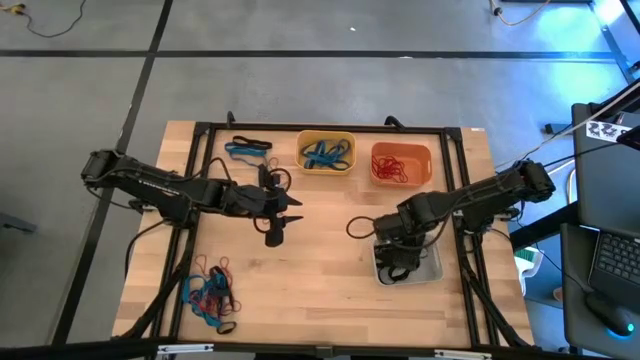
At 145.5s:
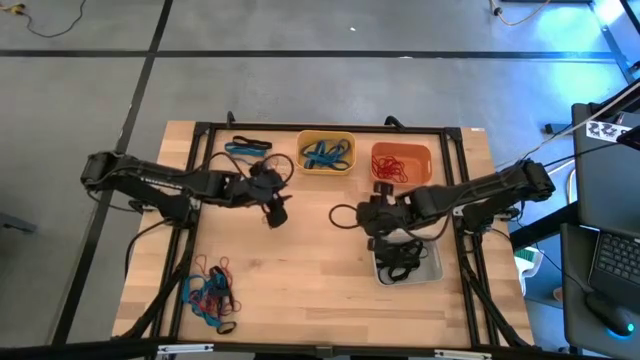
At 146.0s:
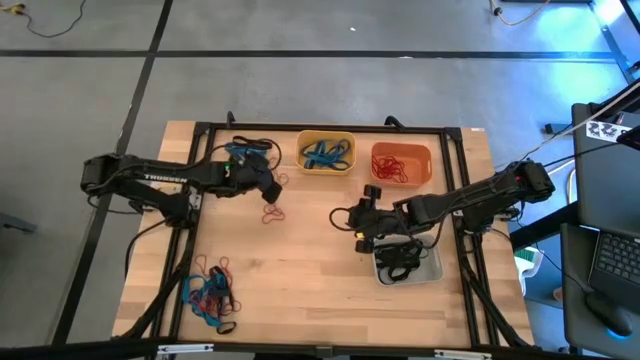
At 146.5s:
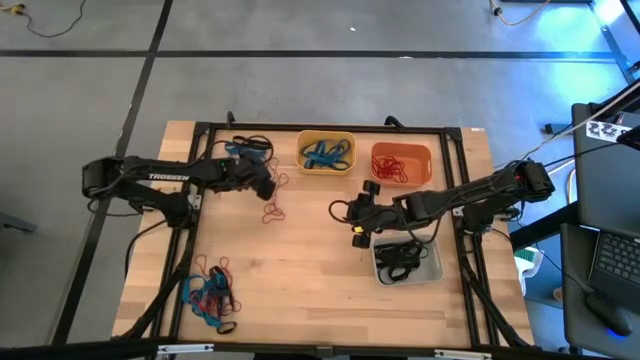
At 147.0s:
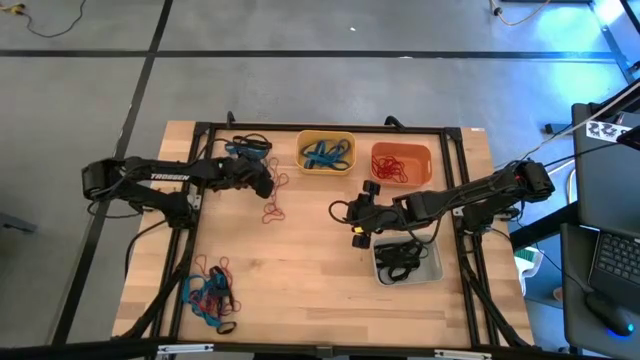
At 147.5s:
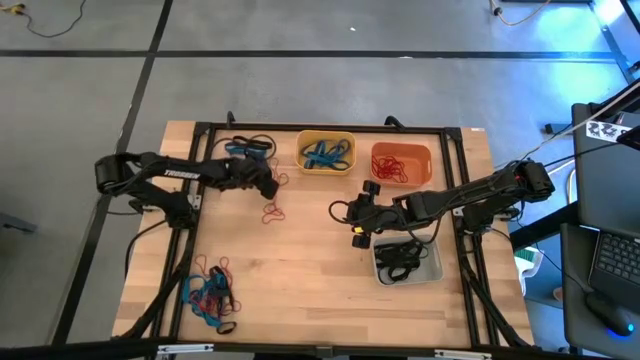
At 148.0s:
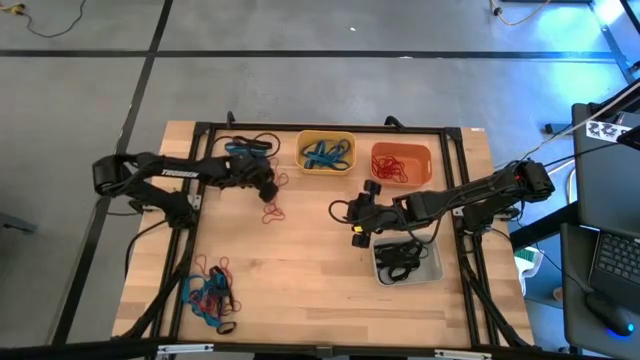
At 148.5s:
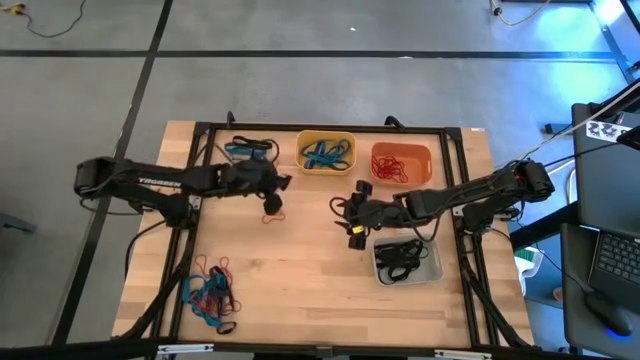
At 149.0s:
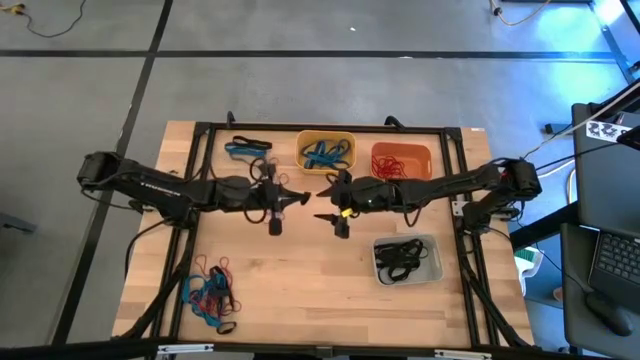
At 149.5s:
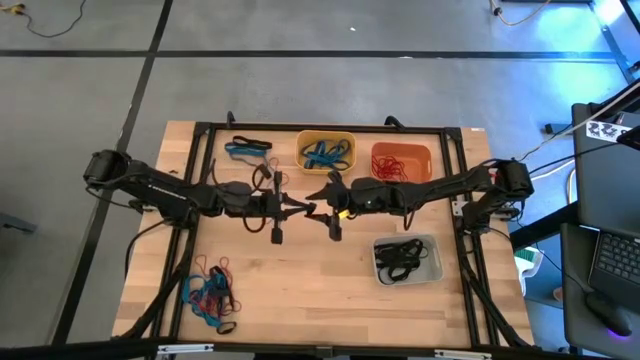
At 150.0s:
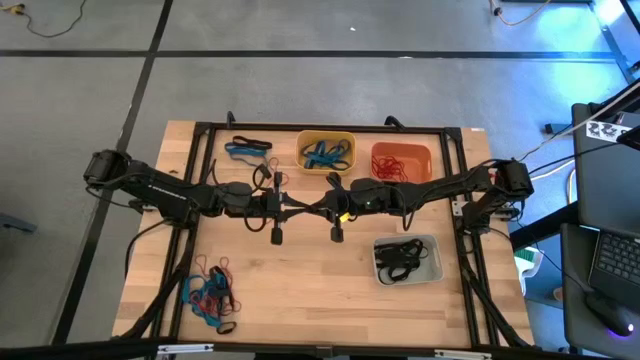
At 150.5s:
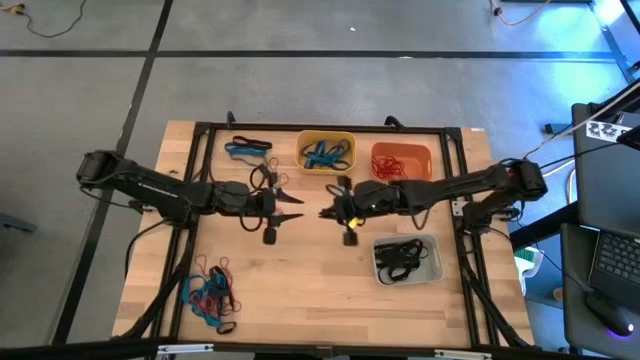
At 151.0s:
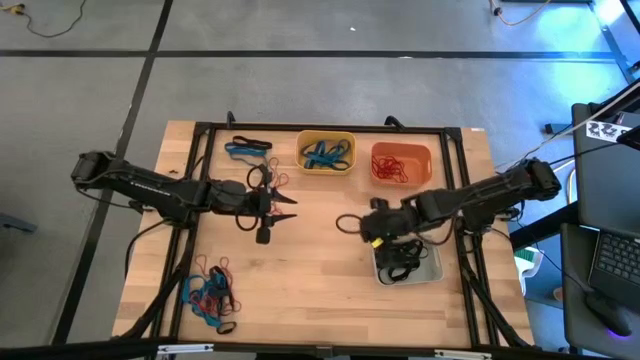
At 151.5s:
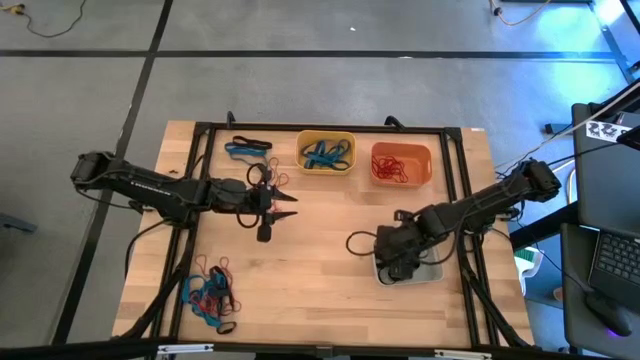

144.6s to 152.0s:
Task: Sort rubber bands into baskets
Put the black rubber band into the white bin

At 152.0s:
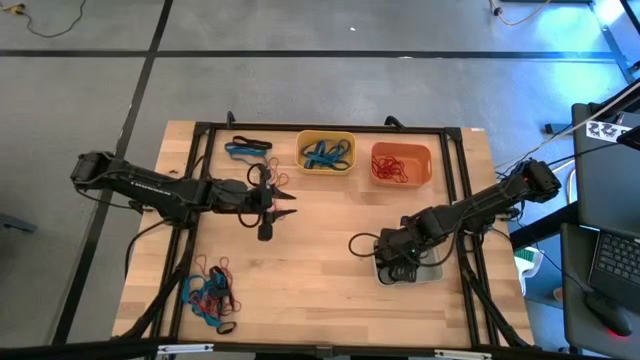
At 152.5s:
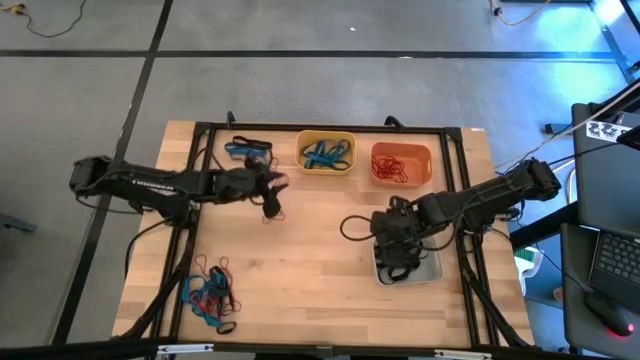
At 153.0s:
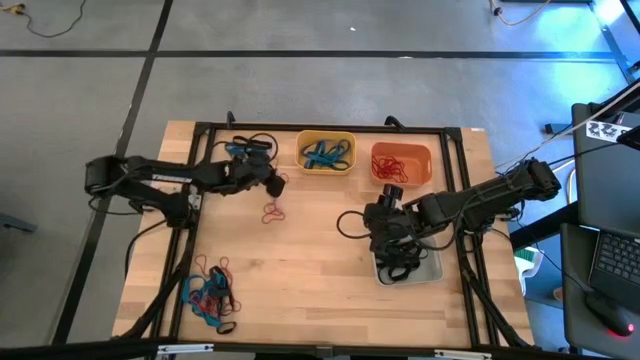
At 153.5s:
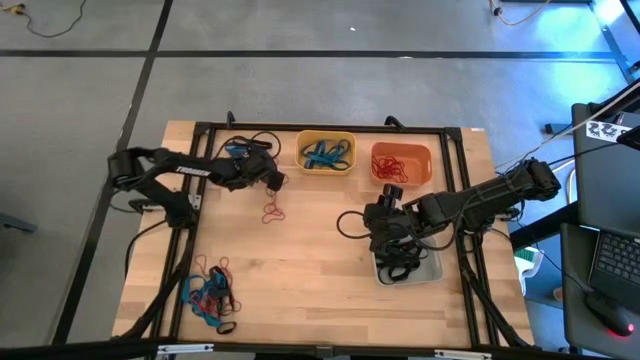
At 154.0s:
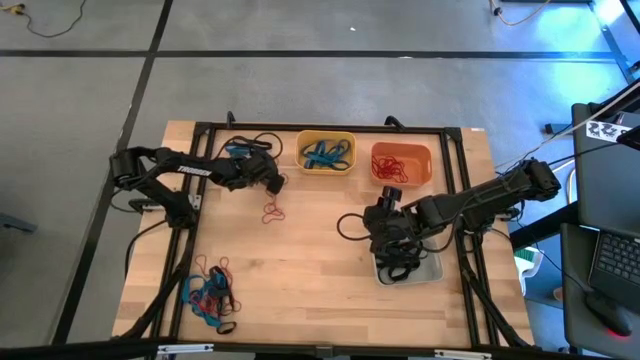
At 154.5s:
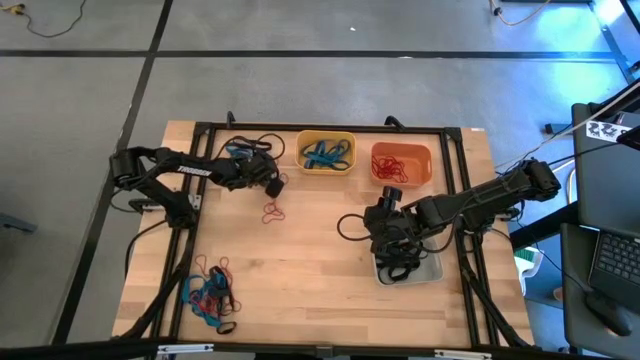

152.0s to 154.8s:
Put the black rubber band into the white bin

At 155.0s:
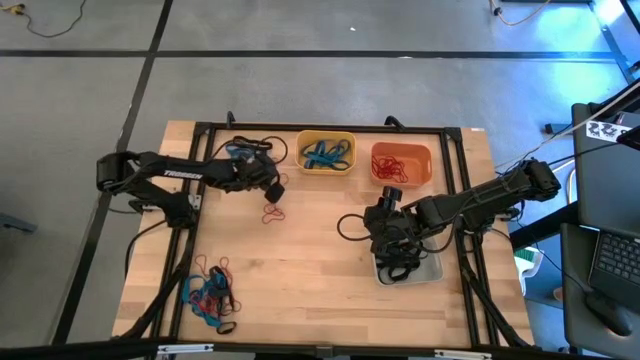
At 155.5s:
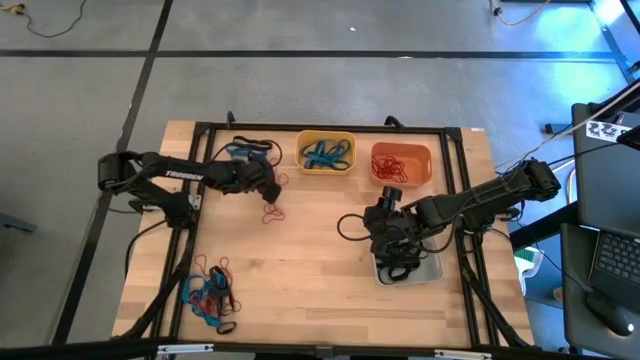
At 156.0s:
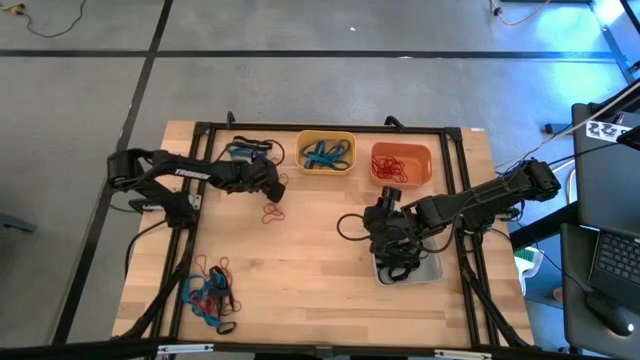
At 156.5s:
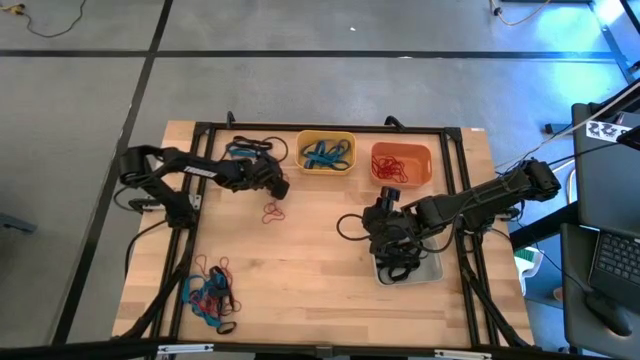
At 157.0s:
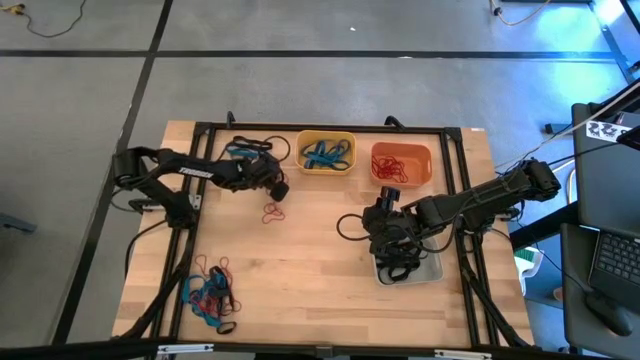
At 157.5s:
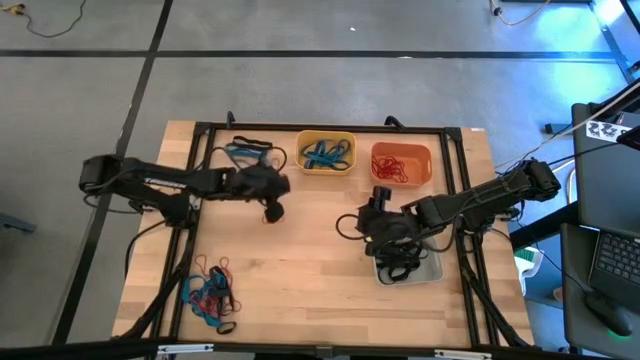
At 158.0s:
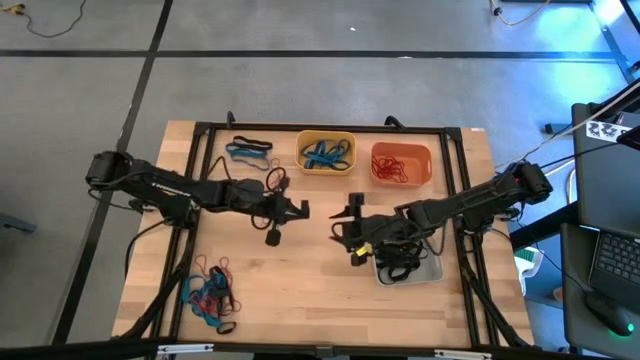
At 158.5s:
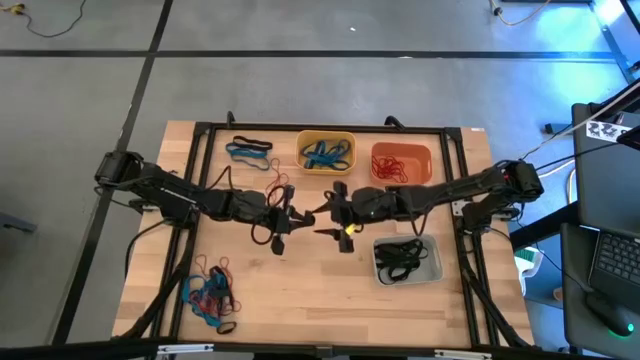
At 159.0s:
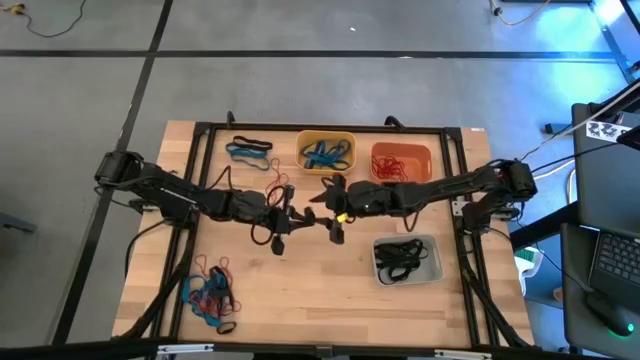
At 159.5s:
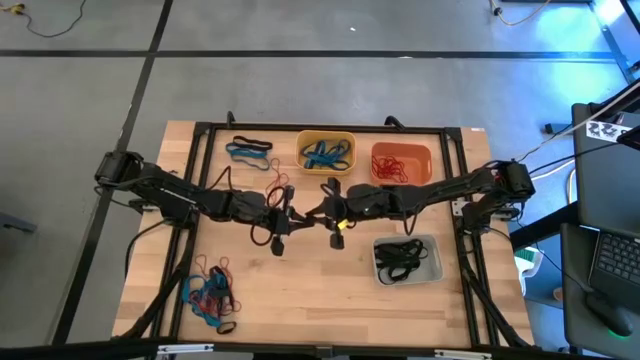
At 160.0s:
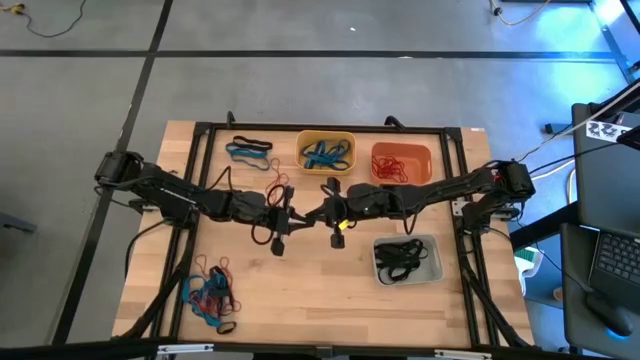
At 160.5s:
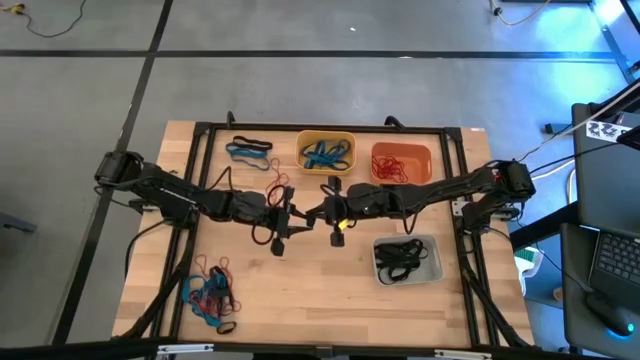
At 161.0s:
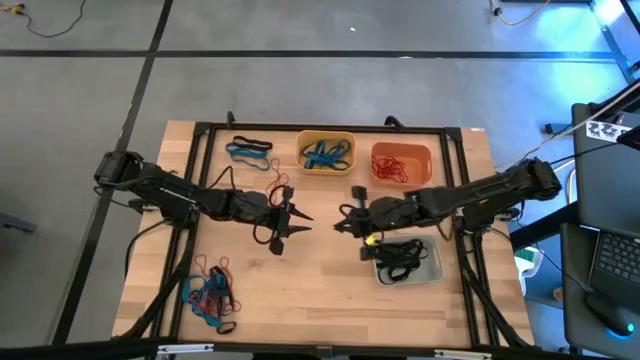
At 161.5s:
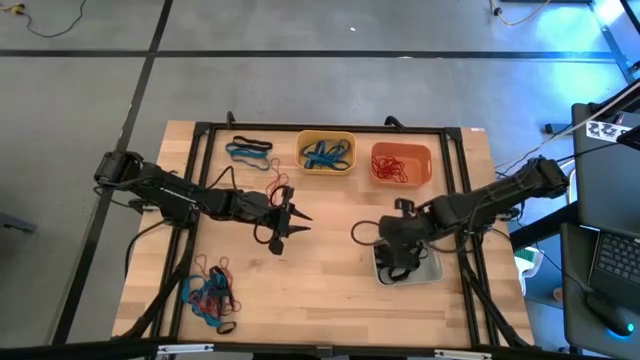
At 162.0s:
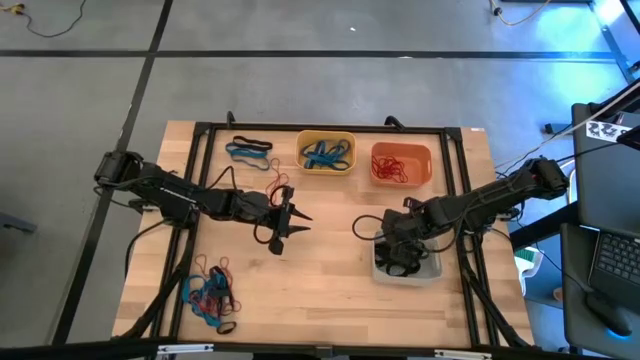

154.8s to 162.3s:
Put the black rubber band into the white bin

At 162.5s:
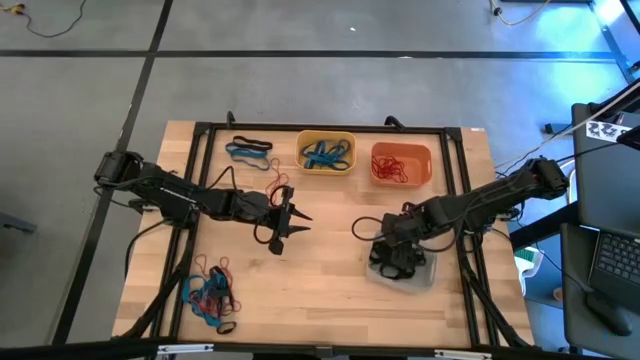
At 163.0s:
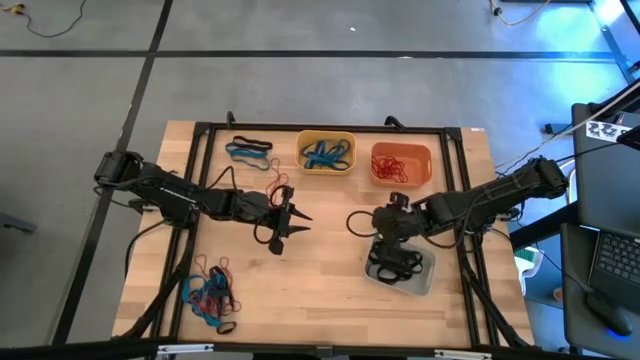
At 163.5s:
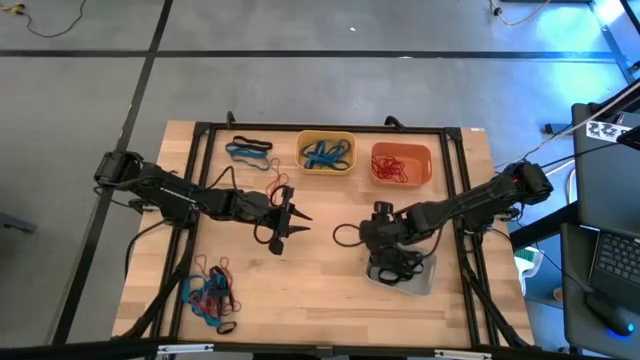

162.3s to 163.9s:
Adjust the white bin

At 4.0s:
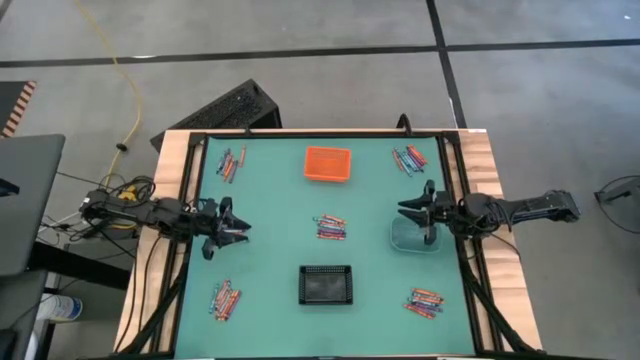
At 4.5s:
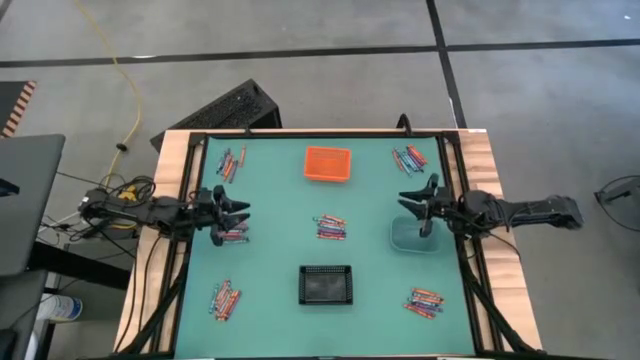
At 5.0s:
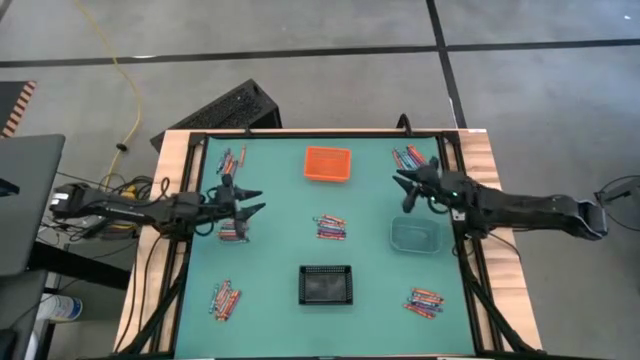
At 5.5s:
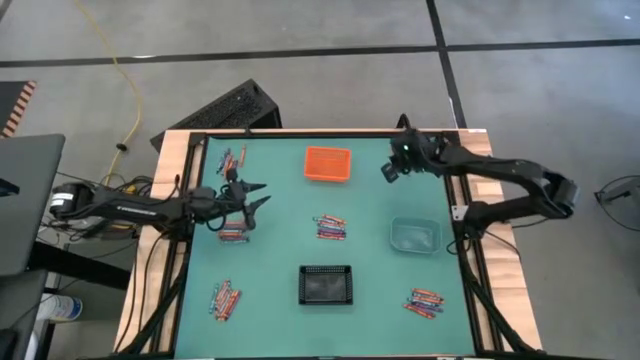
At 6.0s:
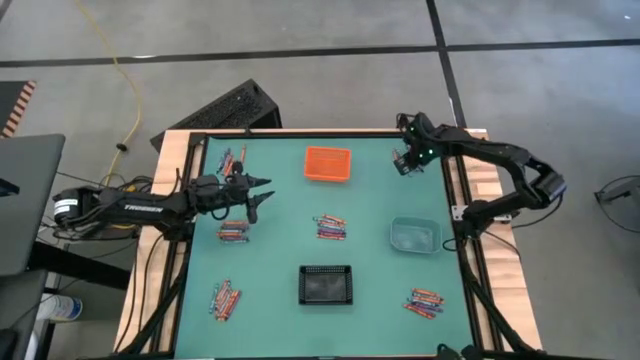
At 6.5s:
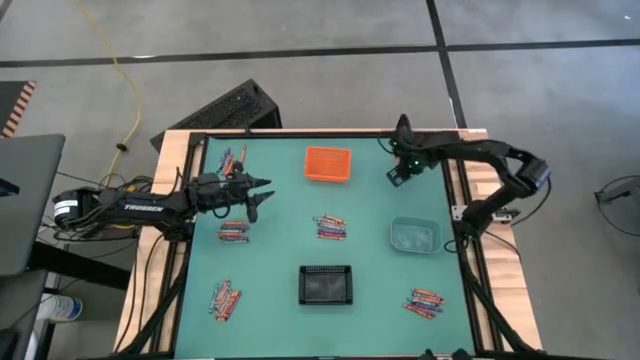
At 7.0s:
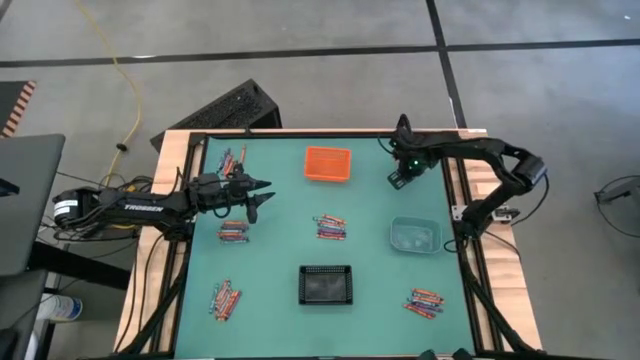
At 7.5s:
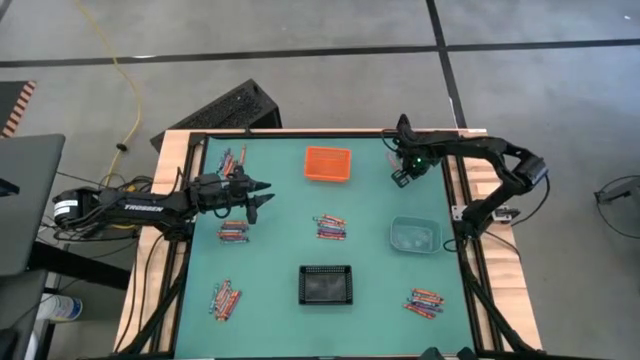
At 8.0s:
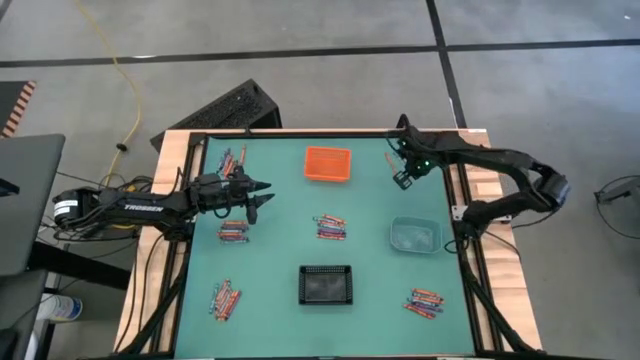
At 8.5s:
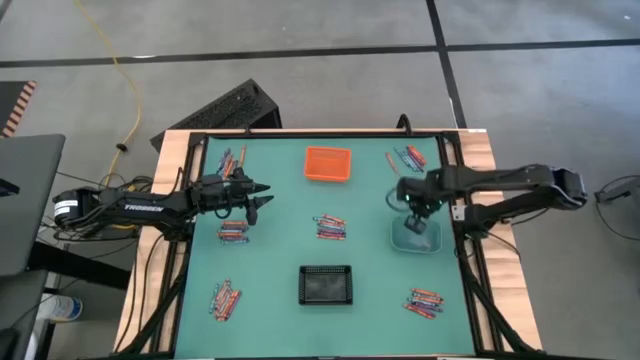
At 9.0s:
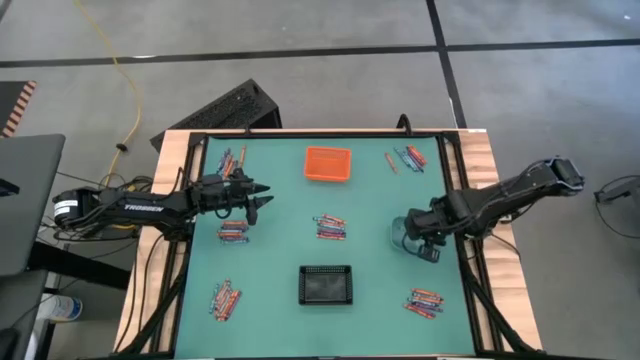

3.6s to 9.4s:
Task: Sort crayons
Put the blue crayon into the blue bin
